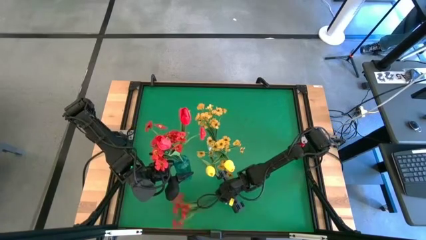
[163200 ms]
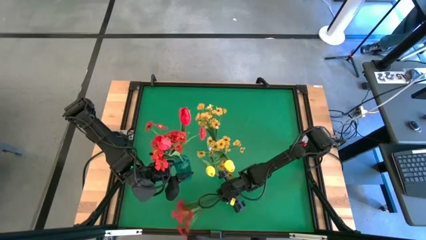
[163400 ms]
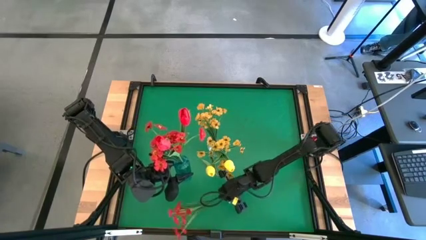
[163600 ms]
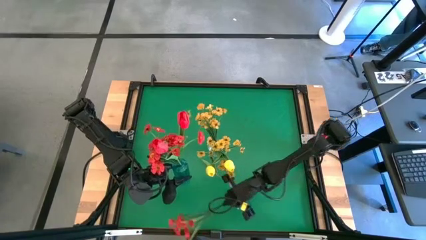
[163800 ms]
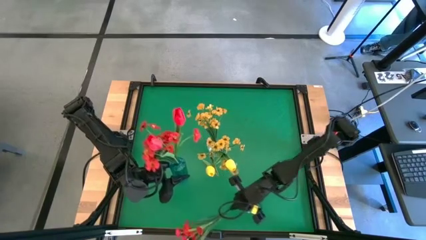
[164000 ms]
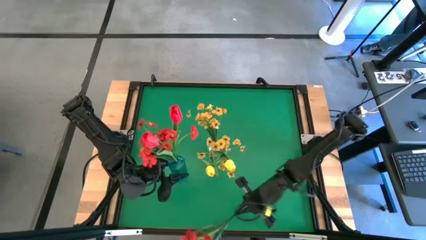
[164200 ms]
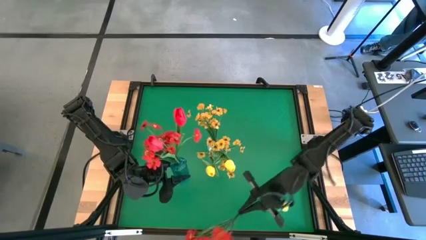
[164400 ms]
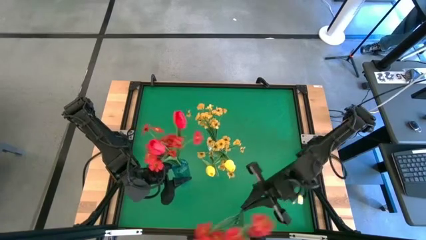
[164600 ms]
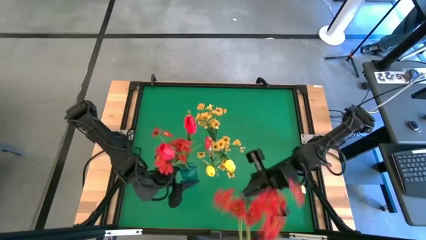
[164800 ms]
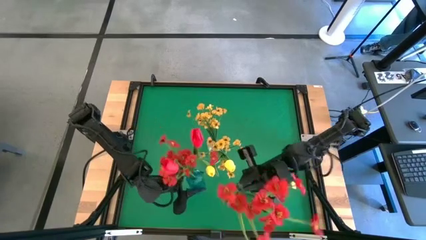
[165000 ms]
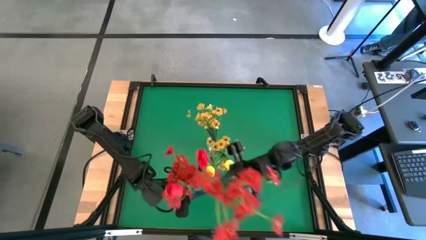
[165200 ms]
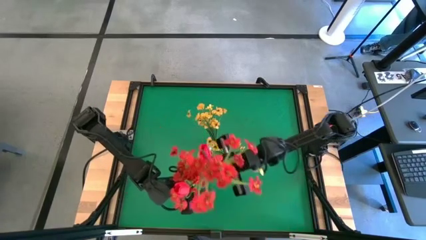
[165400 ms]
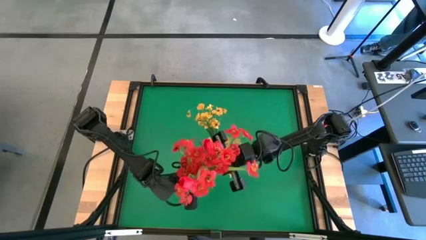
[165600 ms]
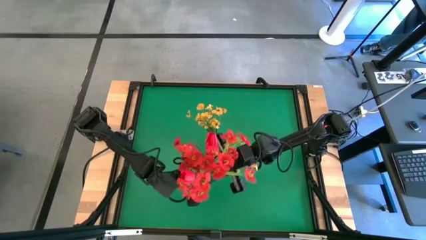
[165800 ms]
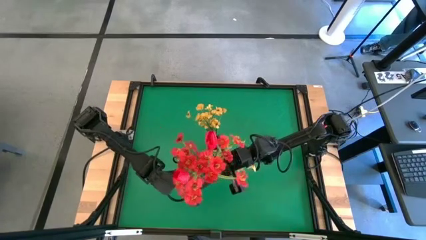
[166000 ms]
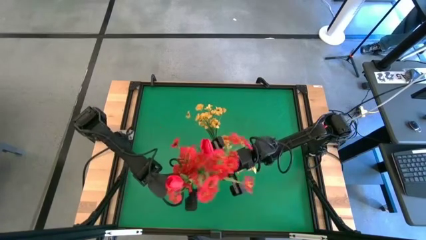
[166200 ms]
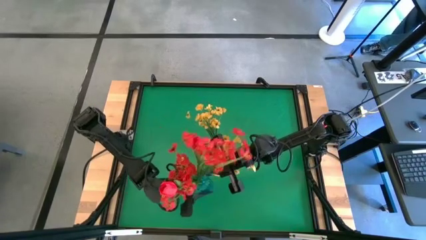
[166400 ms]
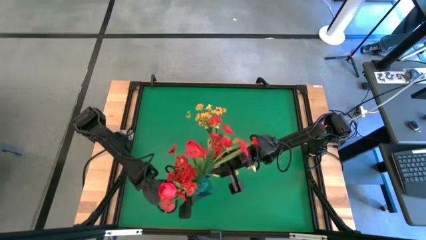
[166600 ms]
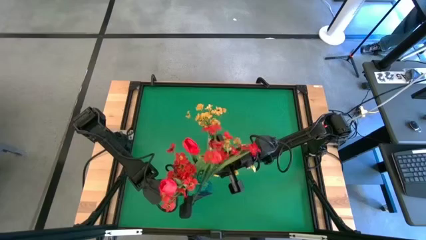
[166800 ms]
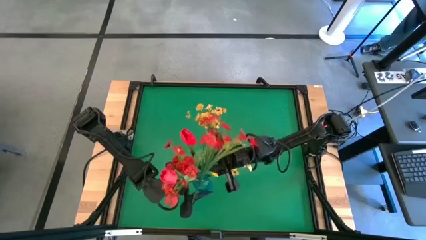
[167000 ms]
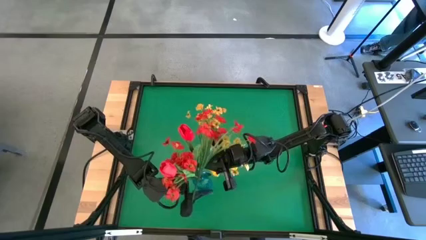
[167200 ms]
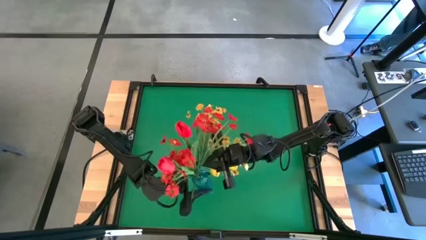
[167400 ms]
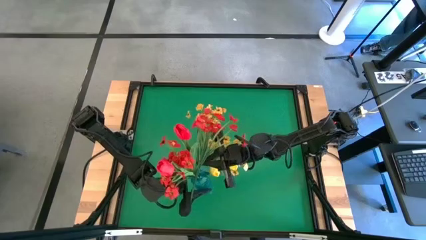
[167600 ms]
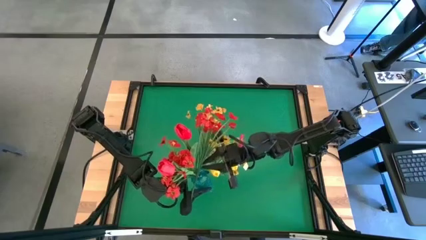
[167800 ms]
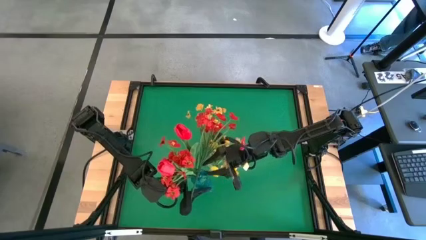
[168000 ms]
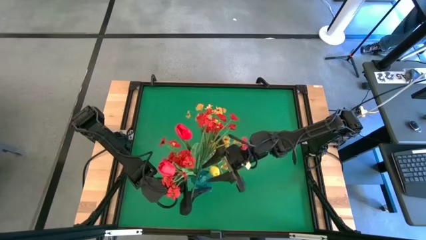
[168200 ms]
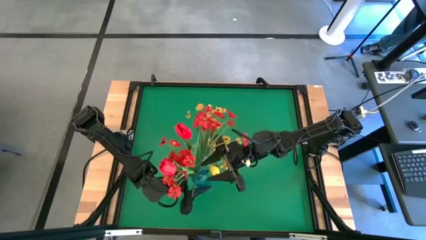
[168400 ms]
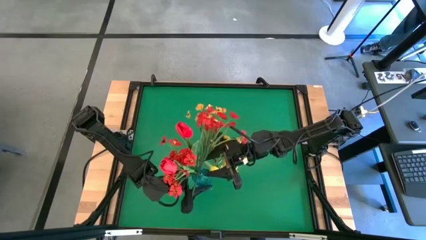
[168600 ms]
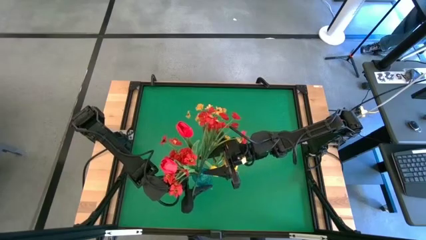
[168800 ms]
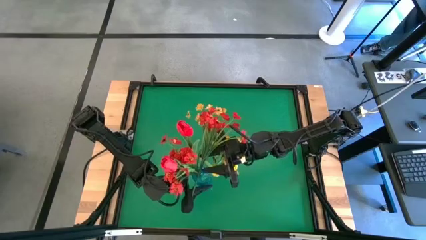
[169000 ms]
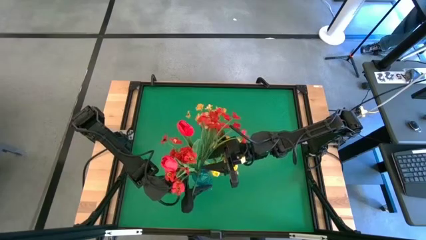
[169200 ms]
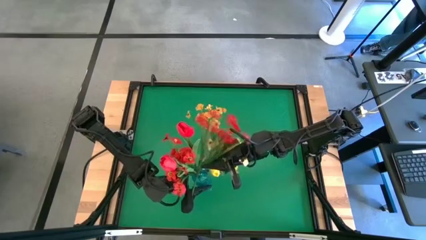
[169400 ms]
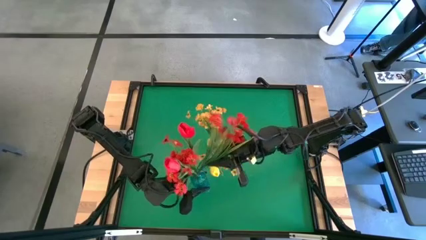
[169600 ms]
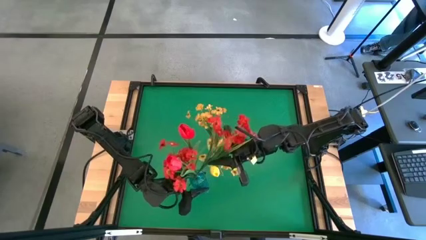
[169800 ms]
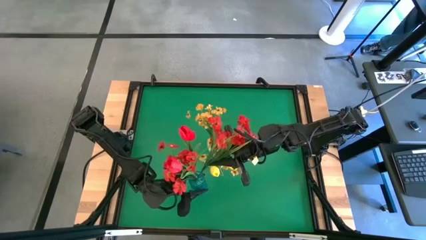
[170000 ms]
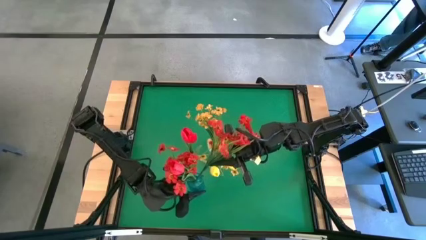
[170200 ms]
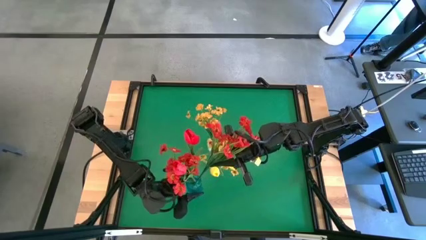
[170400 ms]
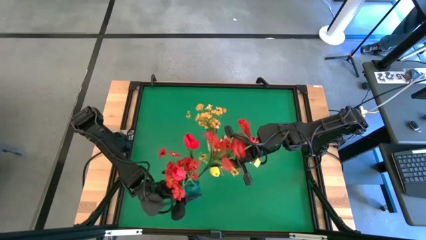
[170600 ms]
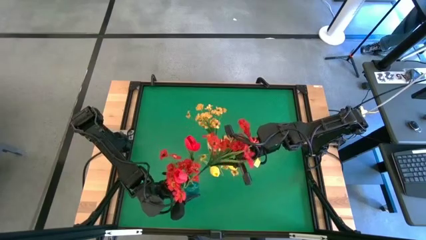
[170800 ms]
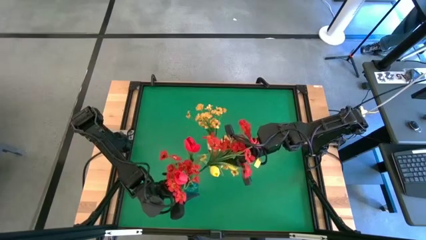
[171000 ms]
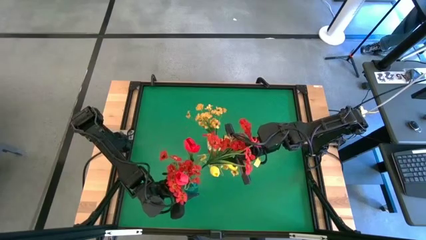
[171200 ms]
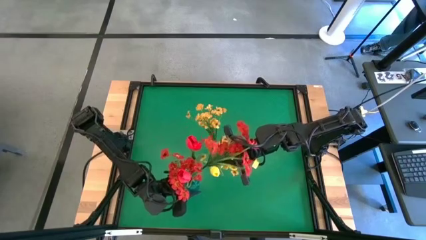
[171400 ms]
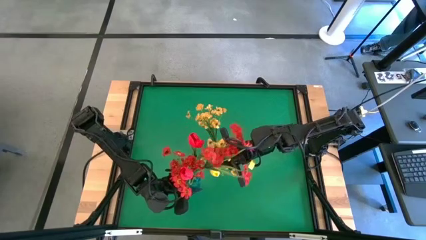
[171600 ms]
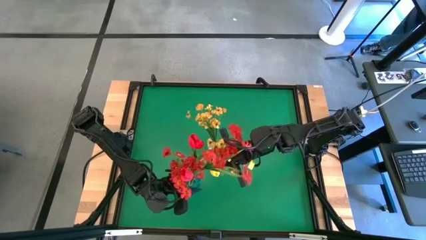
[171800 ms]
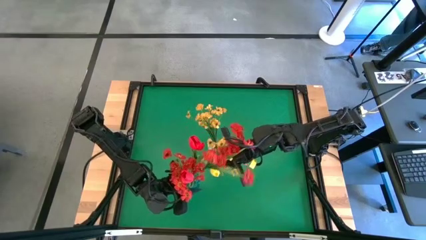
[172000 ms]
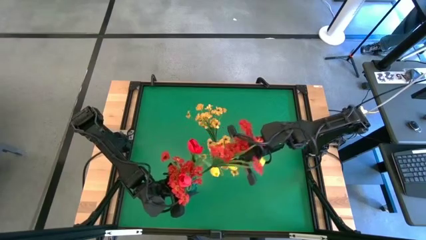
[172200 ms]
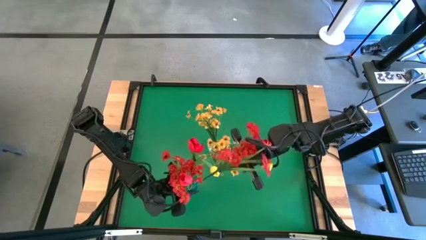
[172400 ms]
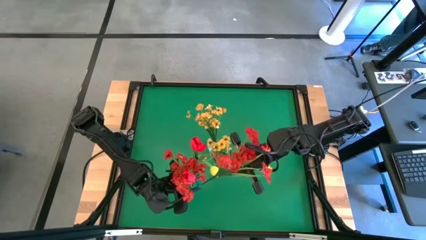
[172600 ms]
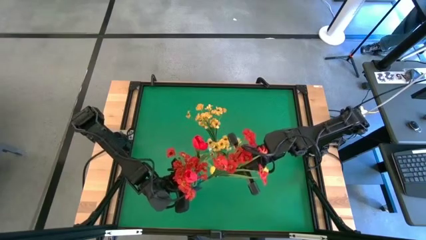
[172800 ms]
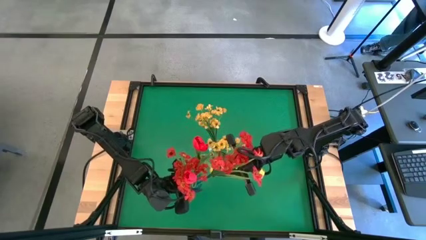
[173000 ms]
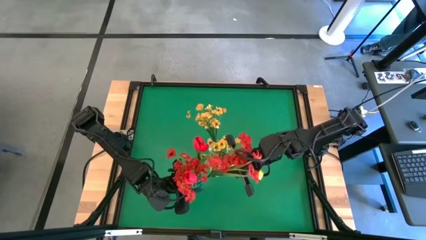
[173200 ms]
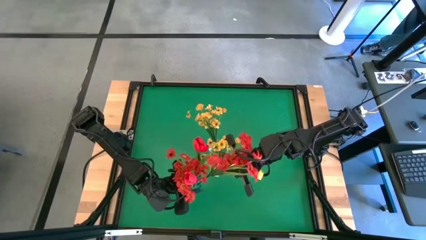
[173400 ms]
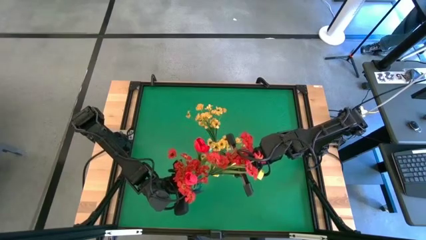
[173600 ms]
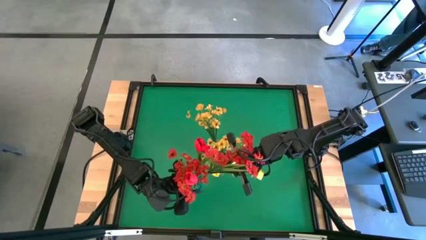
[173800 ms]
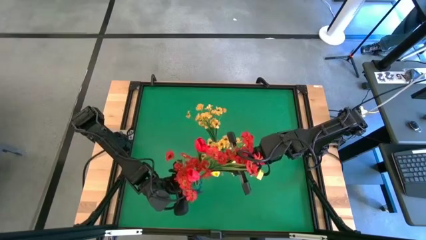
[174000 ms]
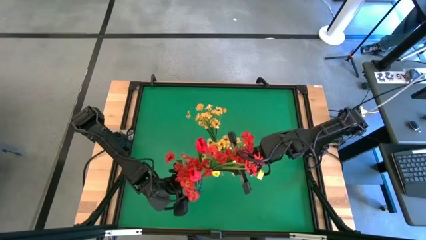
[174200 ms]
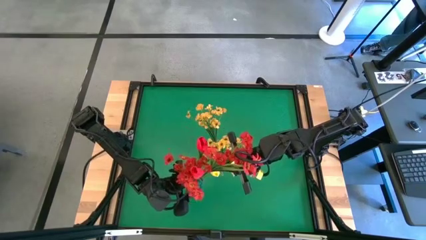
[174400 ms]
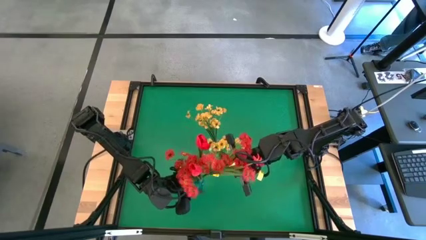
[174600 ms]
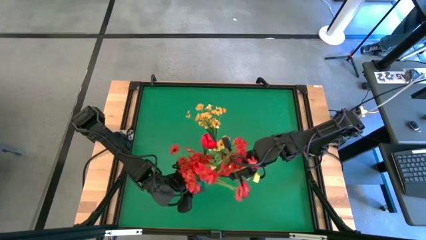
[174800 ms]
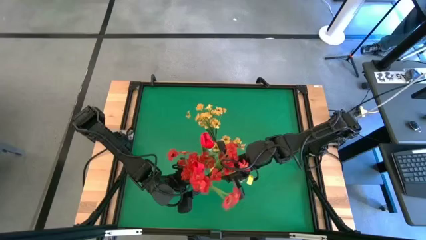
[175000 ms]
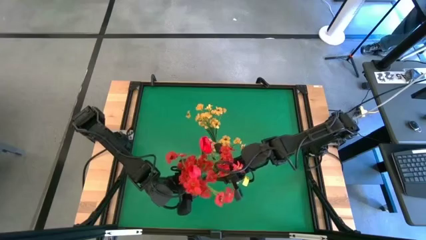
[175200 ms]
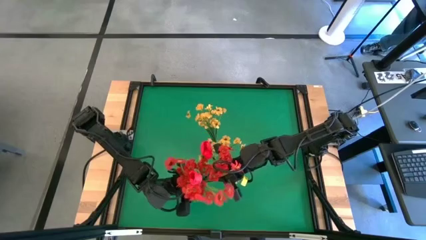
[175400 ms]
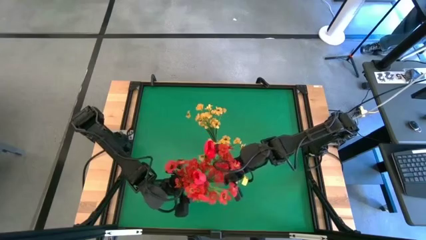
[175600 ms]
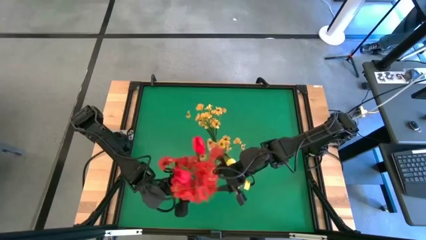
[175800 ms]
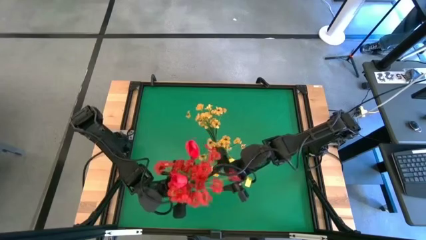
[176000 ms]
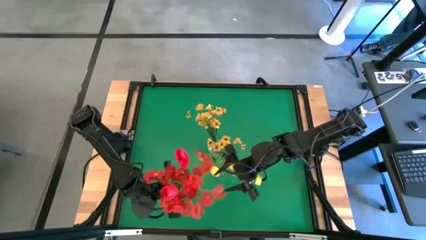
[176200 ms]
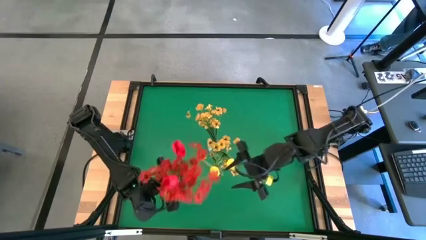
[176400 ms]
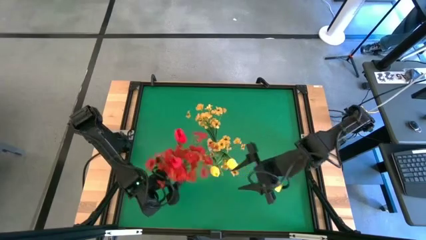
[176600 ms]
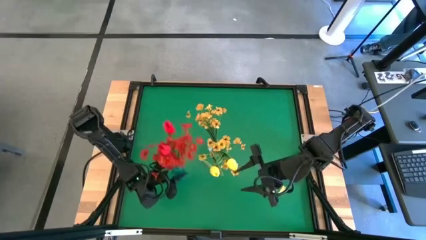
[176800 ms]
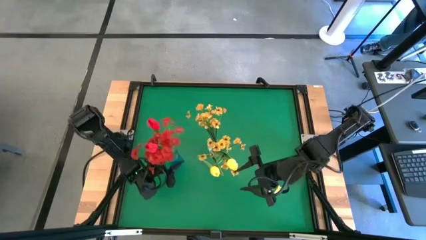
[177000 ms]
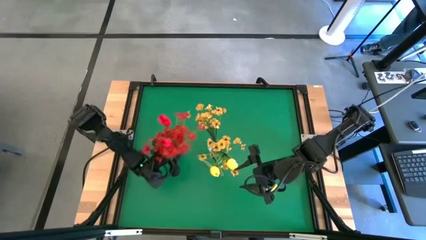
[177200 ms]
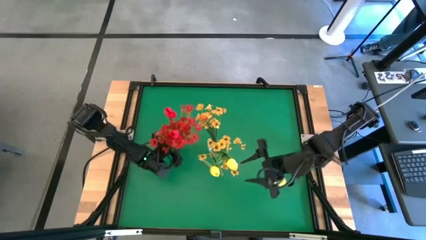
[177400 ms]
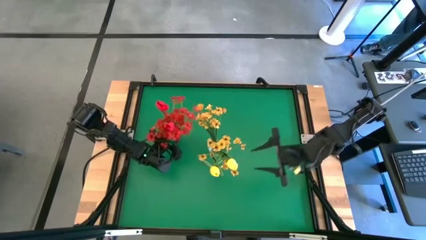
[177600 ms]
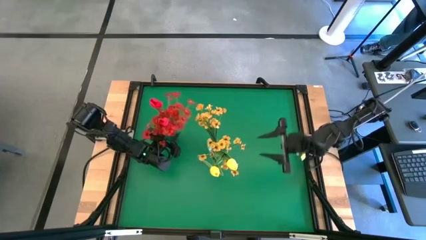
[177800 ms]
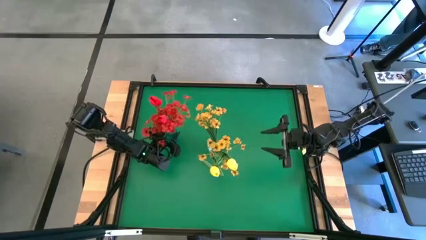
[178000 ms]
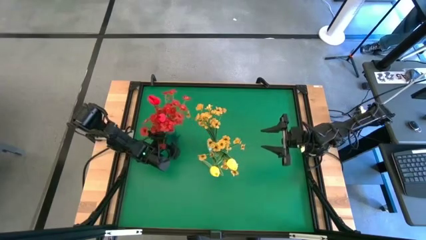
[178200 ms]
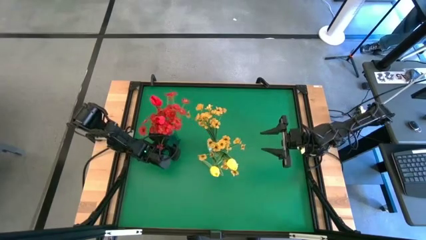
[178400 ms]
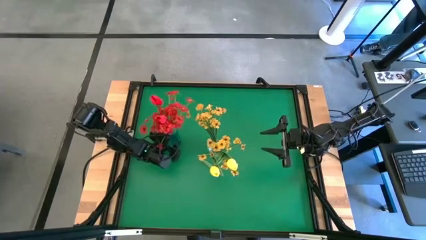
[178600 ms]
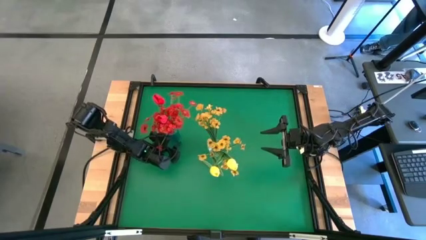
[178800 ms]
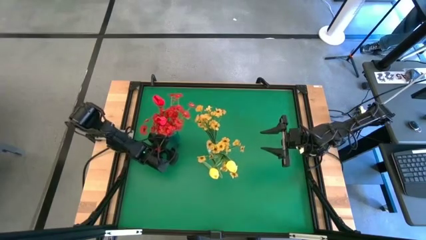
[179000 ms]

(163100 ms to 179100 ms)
Task: Sort flowers into vase by color
Put the red flowers into the blue vase
